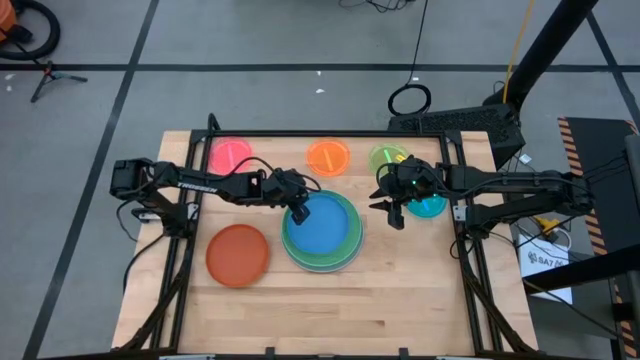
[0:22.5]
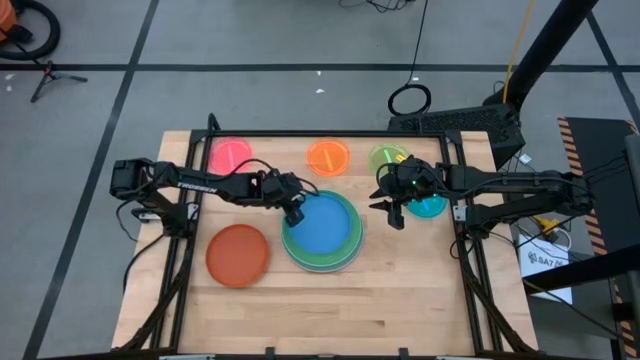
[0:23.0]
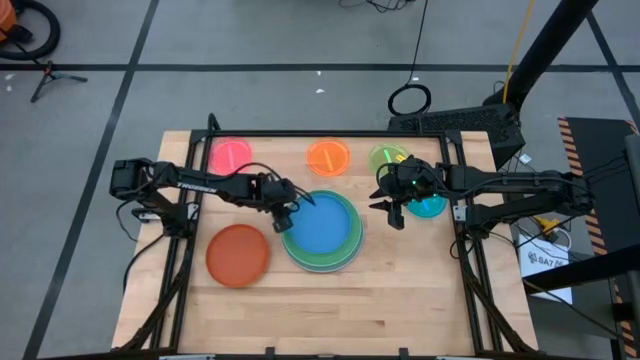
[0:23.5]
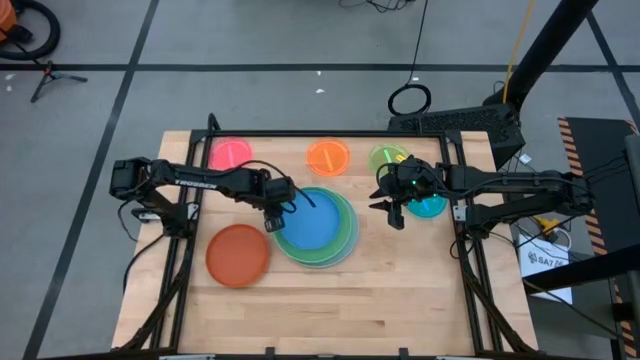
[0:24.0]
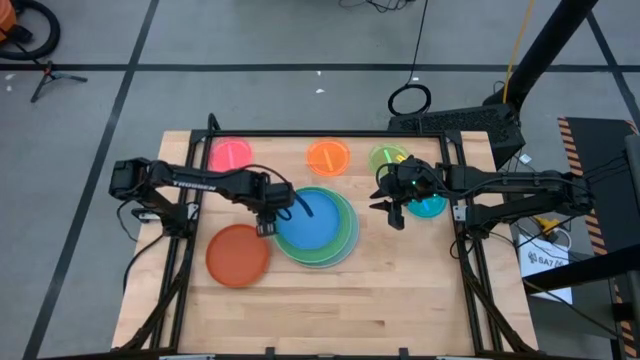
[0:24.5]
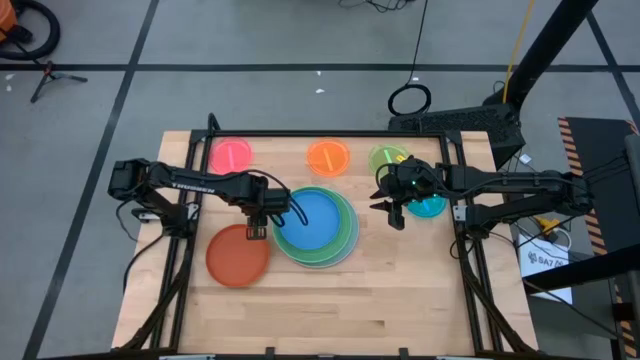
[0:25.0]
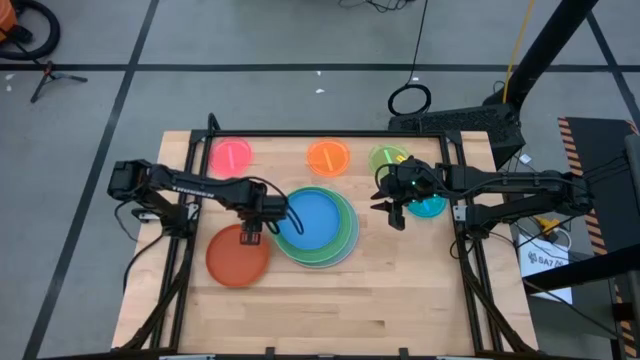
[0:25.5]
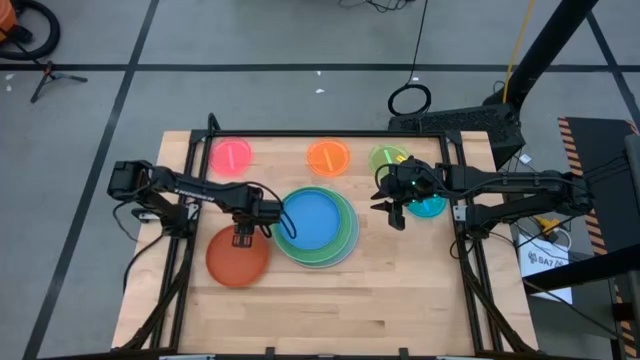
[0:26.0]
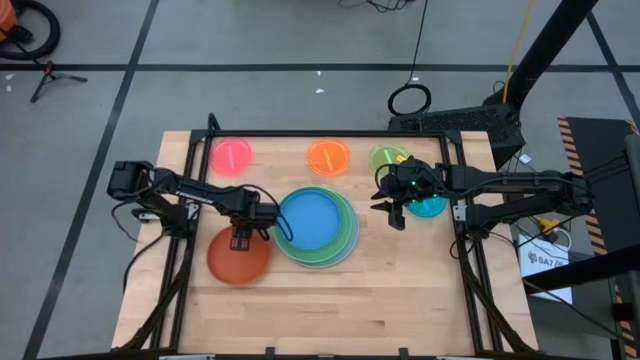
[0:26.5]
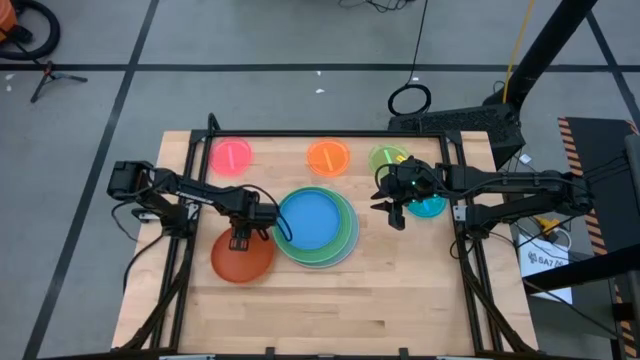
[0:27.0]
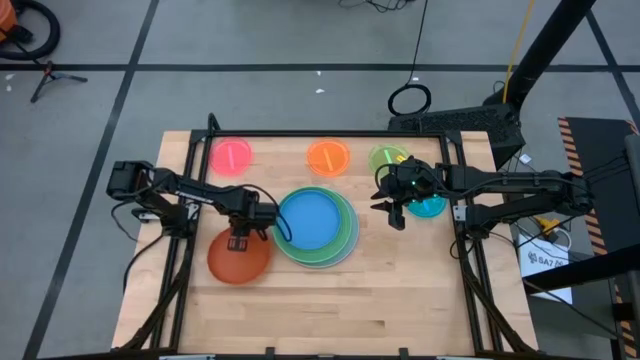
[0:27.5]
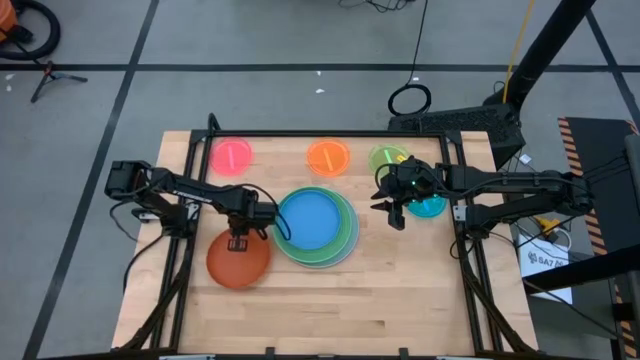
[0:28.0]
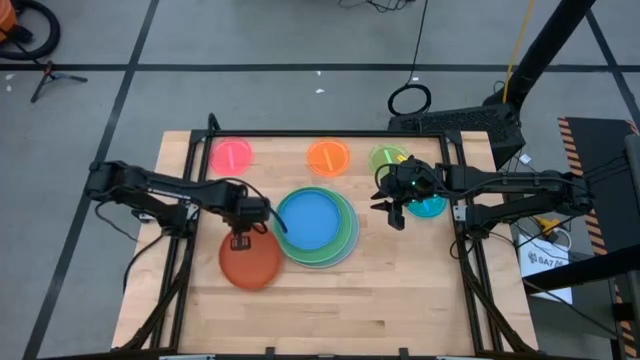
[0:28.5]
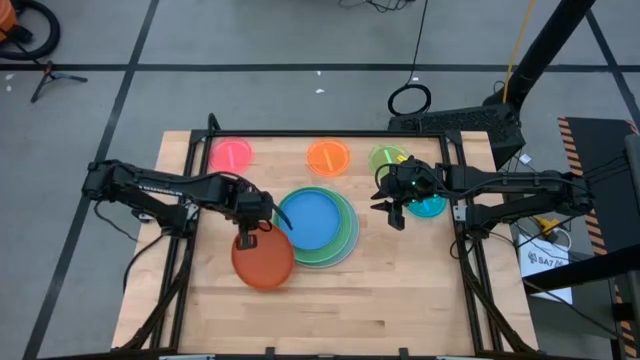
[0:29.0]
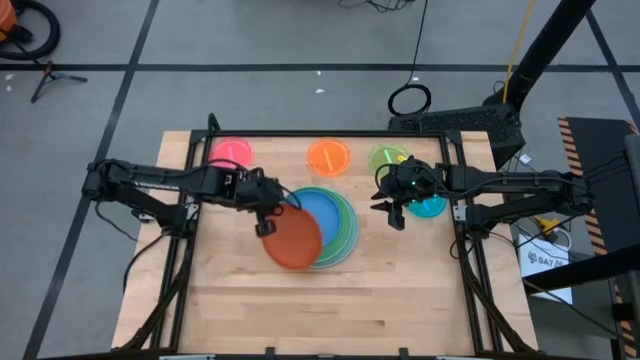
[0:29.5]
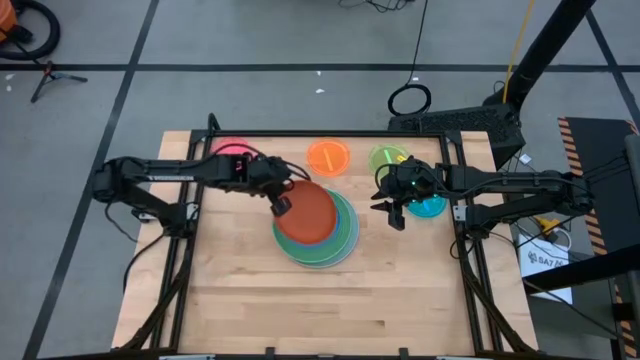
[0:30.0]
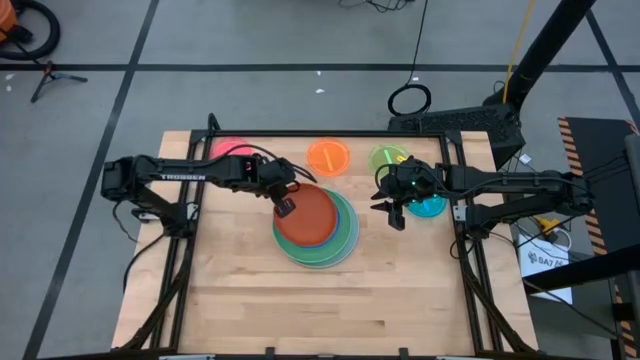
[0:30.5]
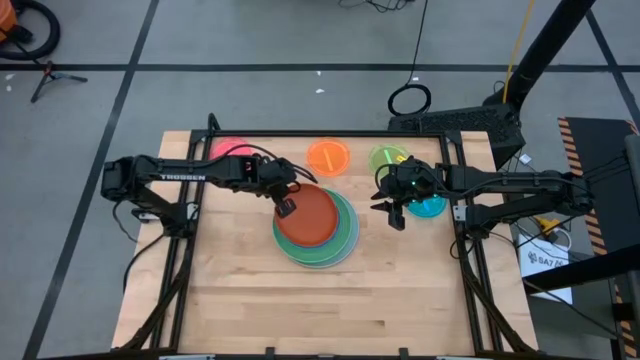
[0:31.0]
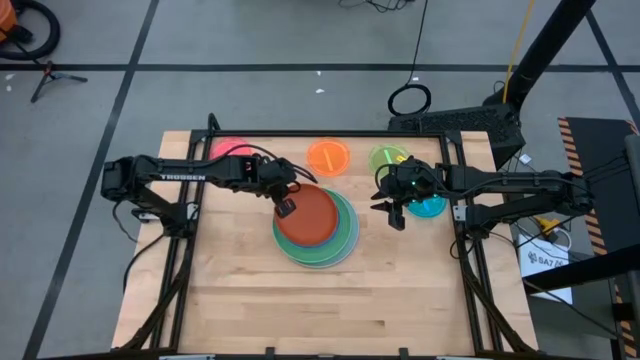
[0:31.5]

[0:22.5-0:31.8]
Task: Stack plastic plates
Stack the dark orange plate on top of the dark blue plate

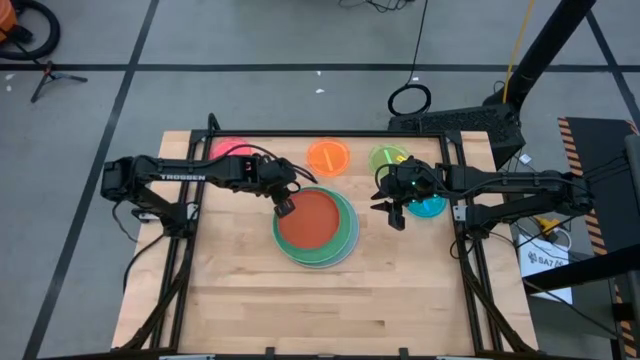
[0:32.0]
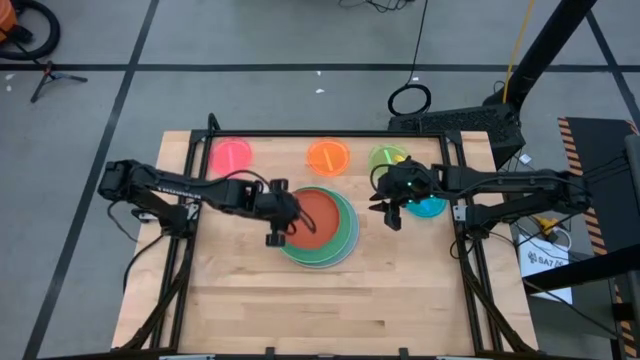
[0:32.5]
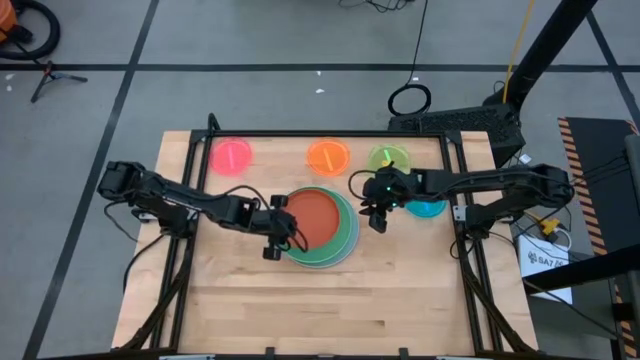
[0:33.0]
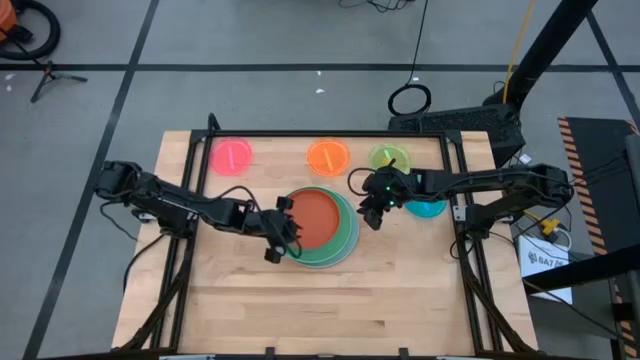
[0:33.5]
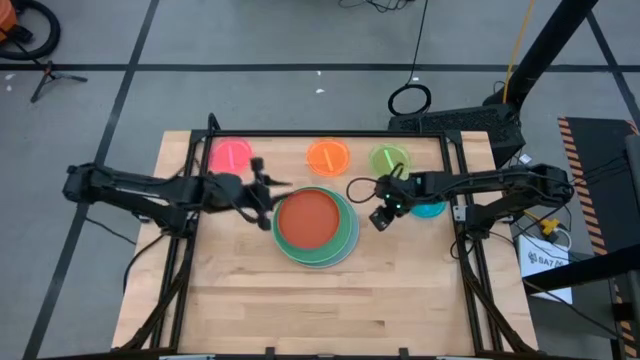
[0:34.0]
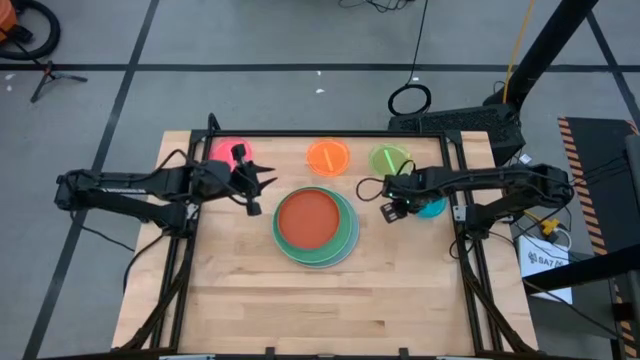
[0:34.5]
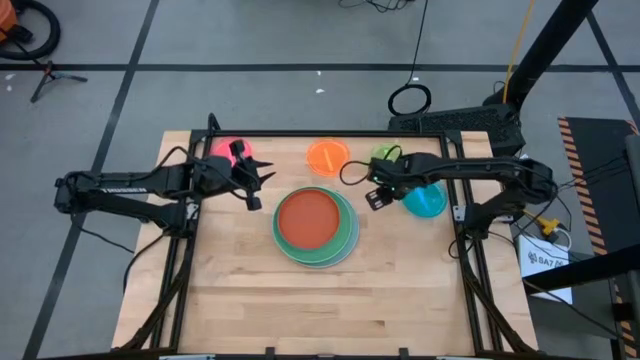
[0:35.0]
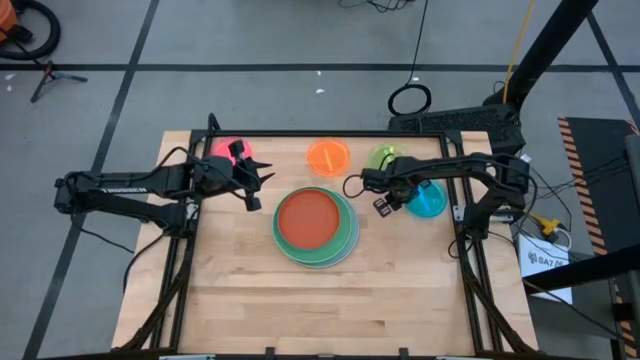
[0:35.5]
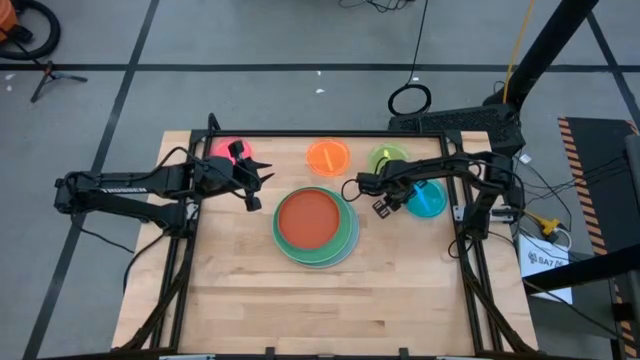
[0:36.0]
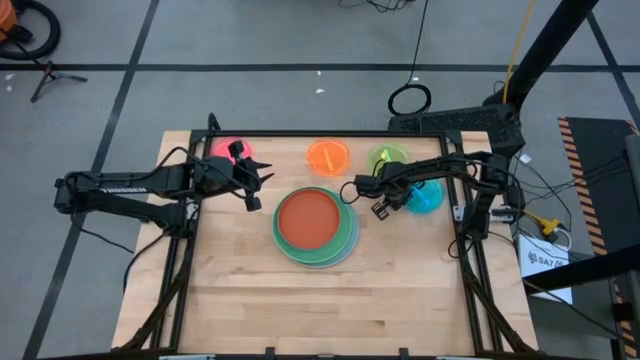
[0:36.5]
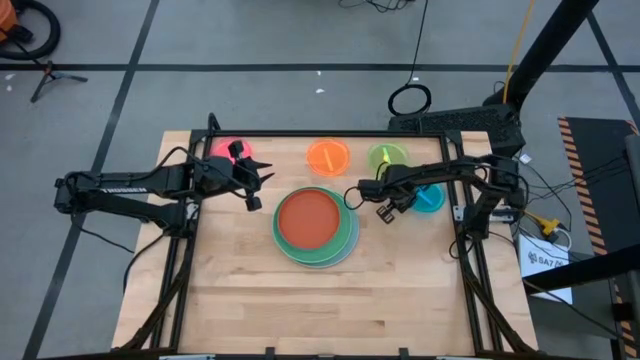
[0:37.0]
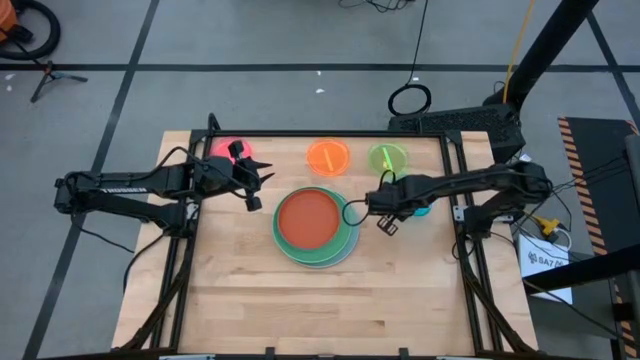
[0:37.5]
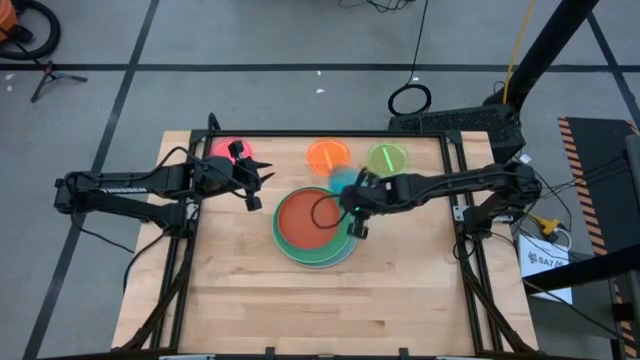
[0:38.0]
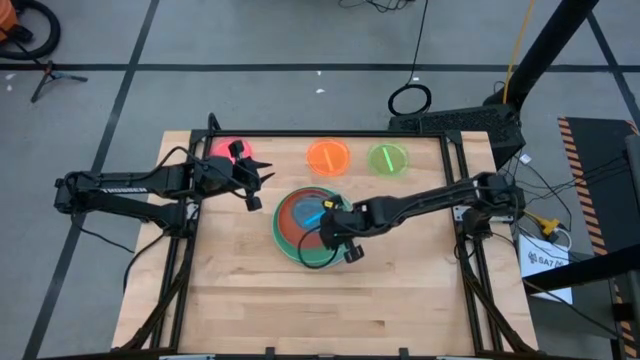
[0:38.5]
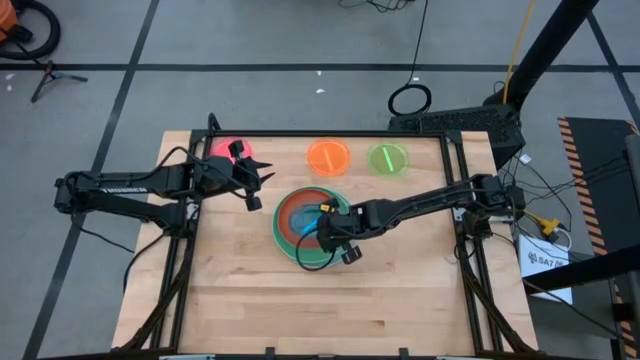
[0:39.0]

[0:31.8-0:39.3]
Stack the blue plate on top of the dark orange plate

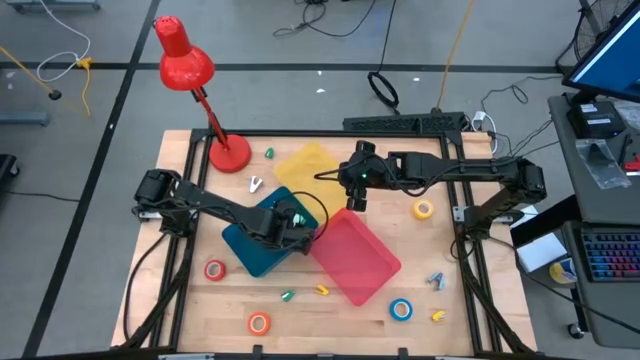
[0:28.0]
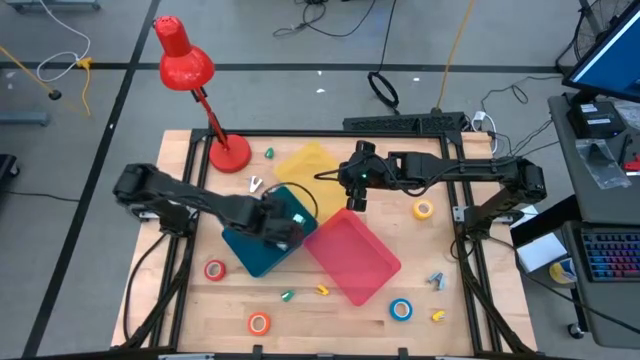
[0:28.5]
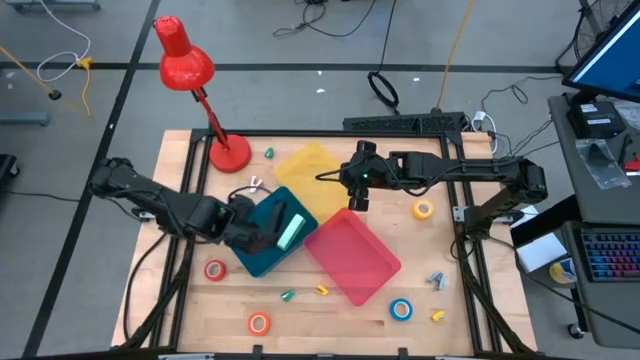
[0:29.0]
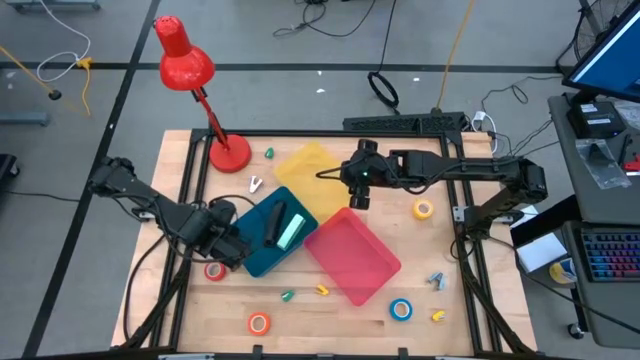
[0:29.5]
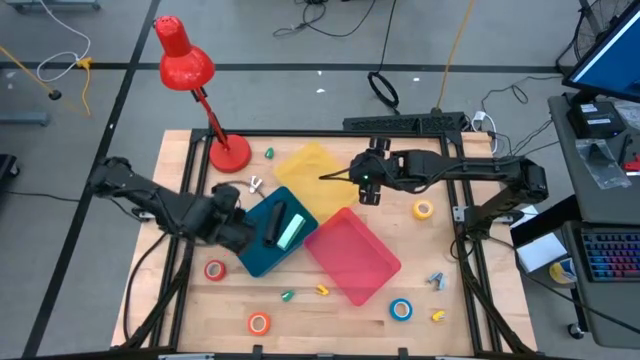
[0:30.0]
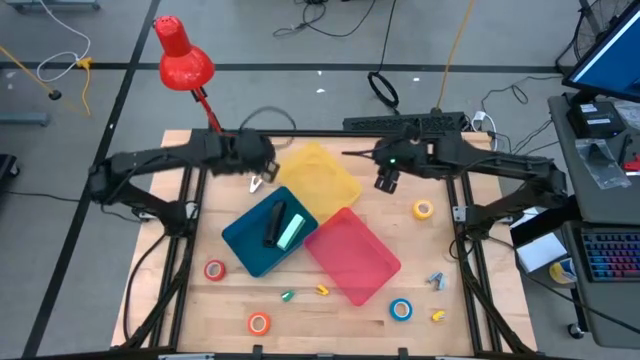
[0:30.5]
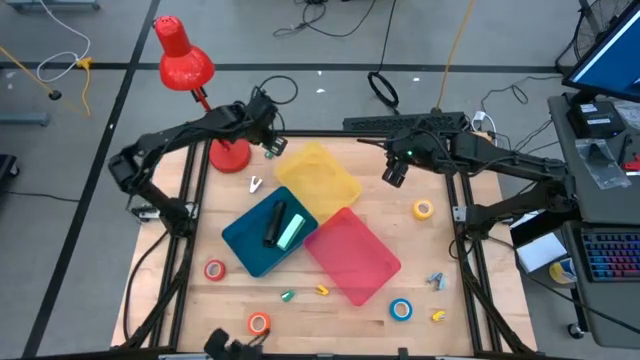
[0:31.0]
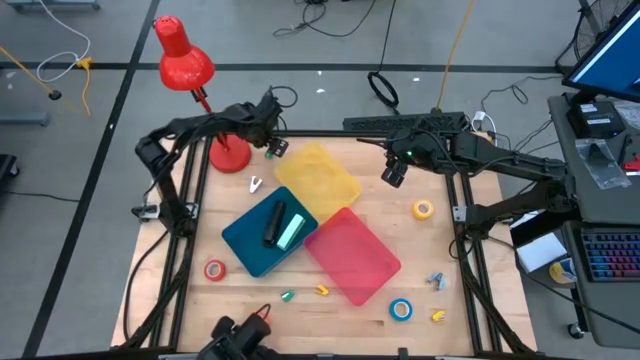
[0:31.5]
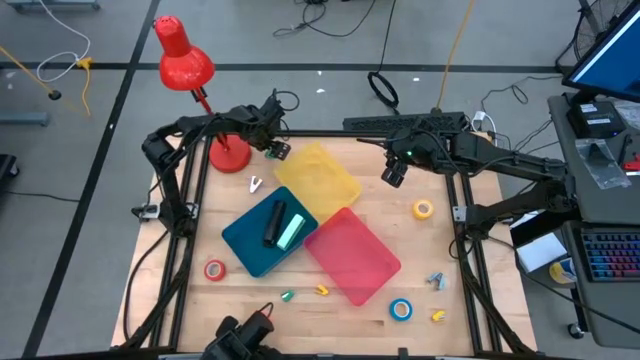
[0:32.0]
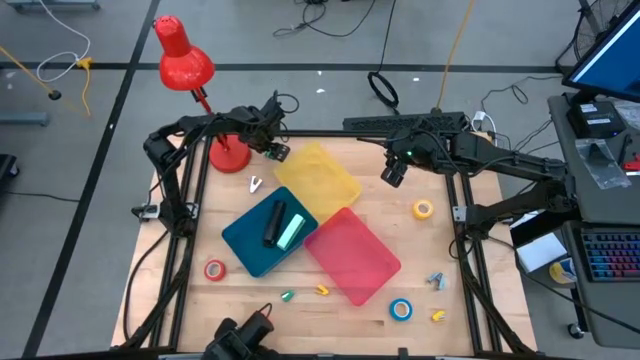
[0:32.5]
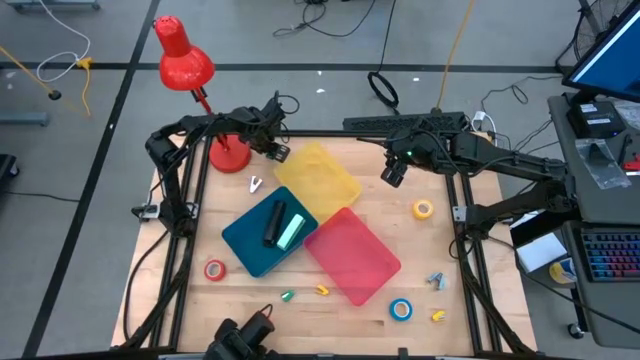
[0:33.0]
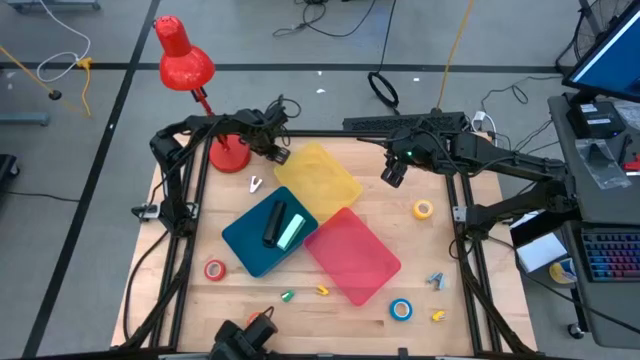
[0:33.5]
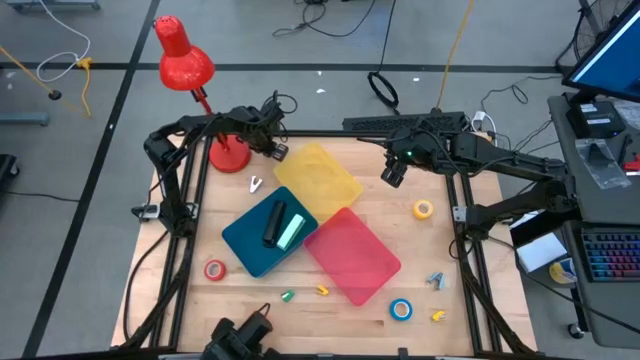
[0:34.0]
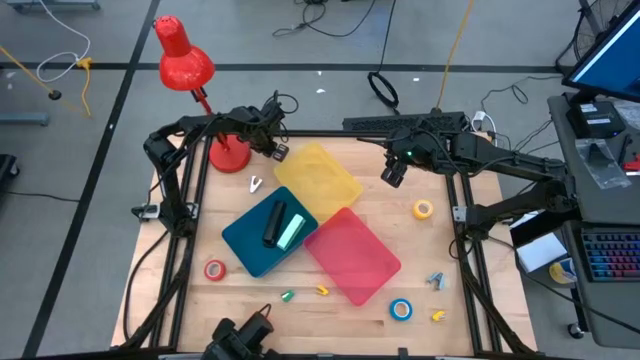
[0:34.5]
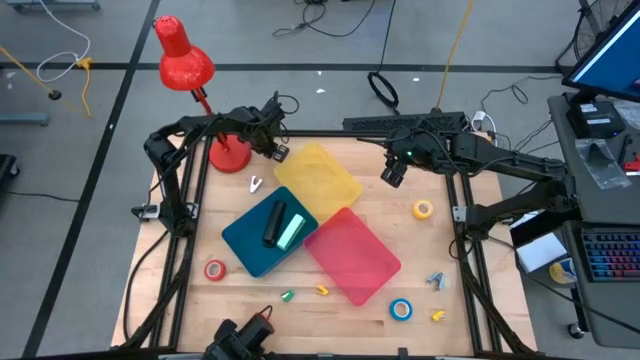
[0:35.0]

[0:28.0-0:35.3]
Task: Pick and place Stapler, Stapler remover, tape
Put the top green stapler into the blue bin
